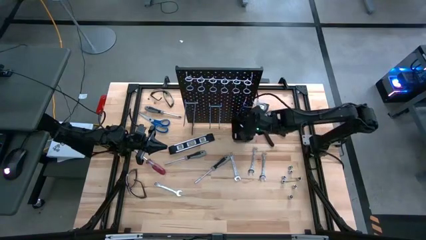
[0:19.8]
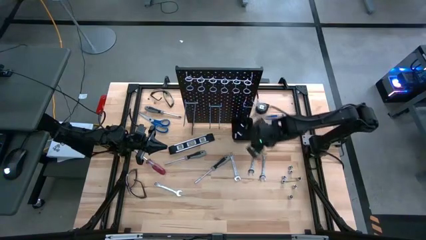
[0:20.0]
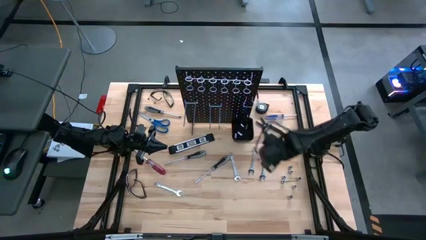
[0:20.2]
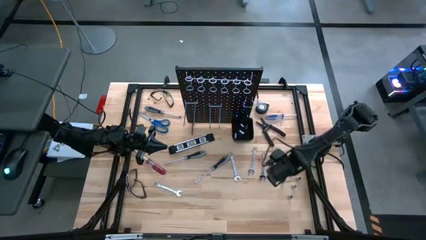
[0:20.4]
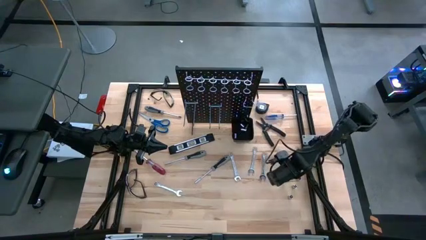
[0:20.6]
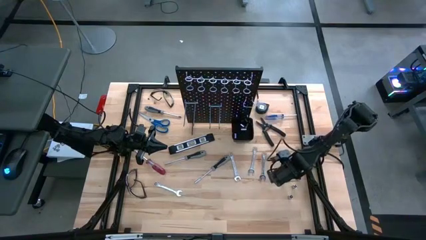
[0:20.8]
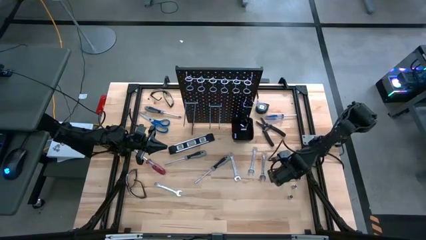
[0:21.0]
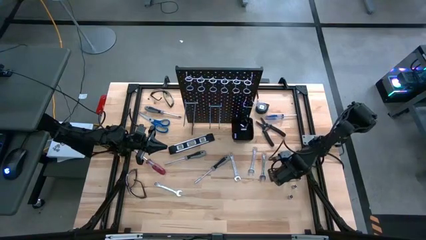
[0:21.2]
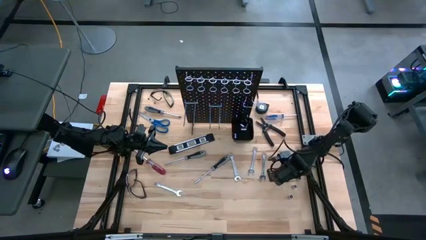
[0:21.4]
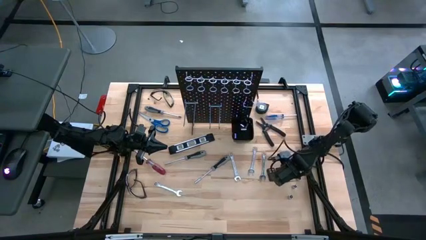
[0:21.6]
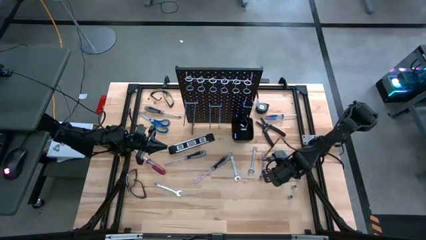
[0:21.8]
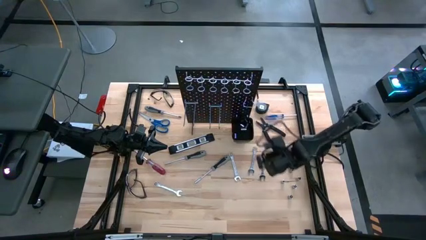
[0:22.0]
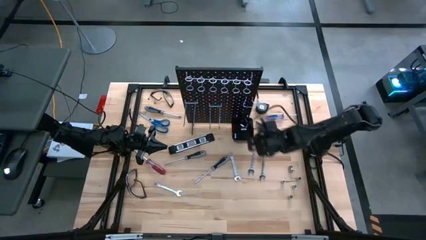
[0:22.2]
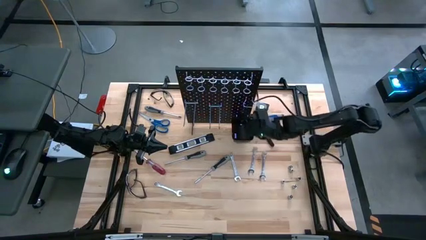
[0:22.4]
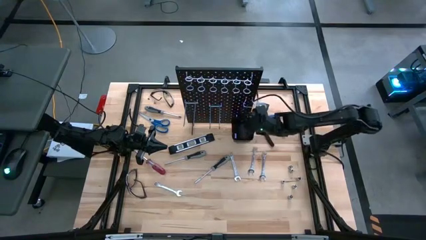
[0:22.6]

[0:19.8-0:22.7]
Task: Hang tools onto peg board
Put the silver socket in the black bin on the pegboard

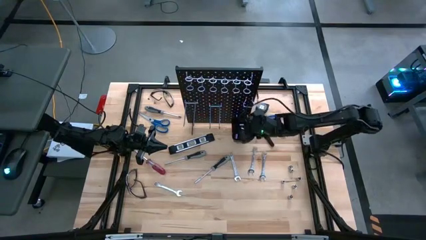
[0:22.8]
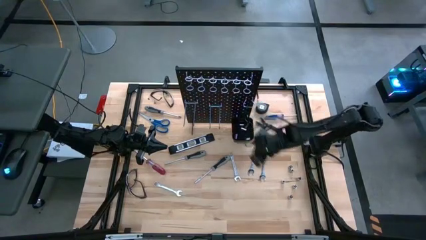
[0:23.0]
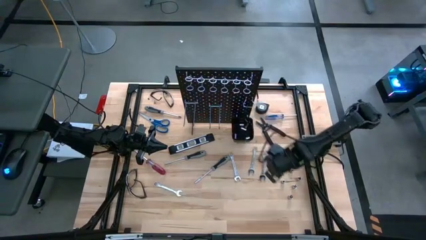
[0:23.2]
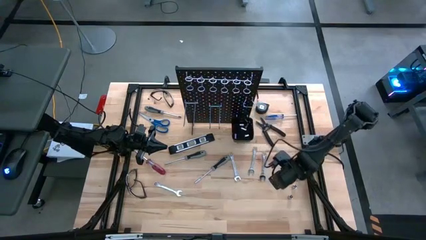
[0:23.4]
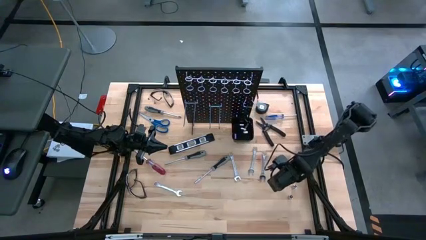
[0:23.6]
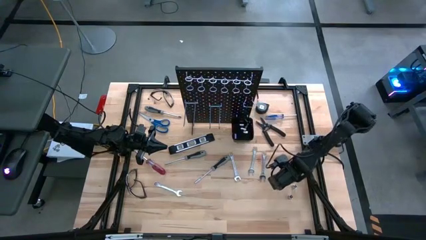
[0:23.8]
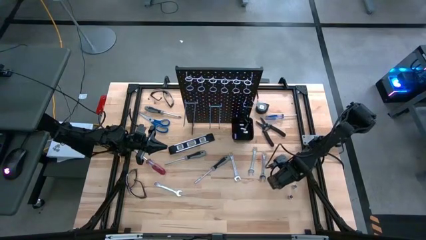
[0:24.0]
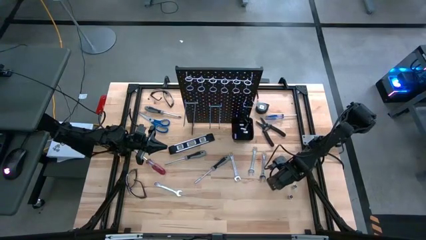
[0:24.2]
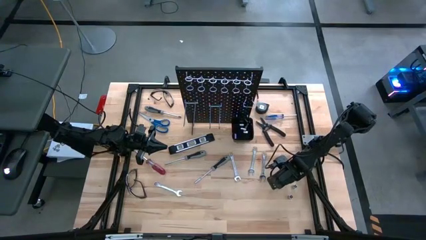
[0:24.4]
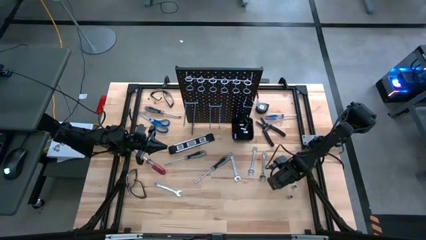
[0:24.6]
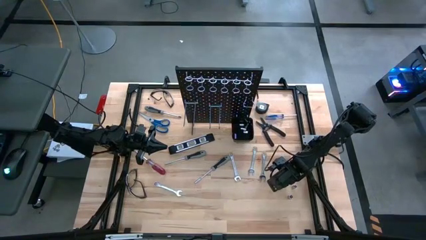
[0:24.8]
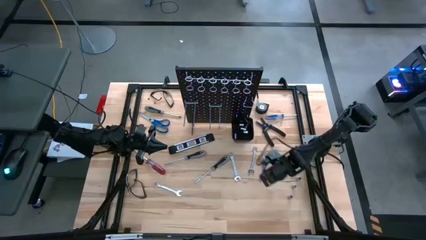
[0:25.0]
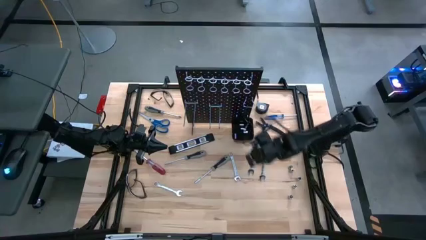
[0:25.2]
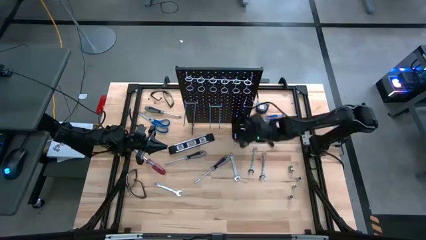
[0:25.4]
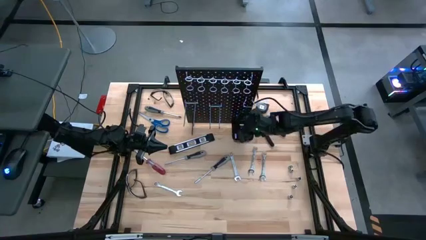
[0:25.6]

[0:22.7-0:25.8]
Put the silver socket in the black bin on the pegboard

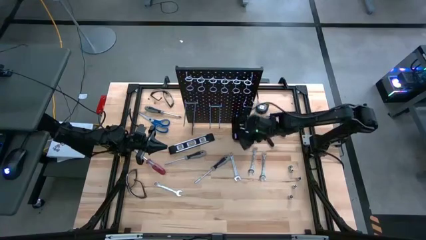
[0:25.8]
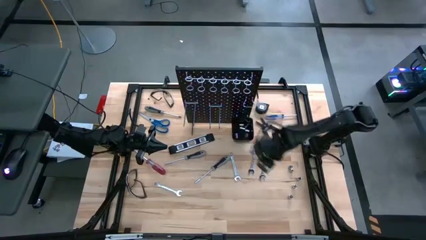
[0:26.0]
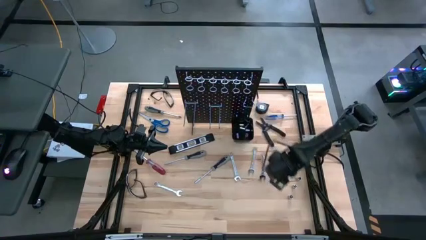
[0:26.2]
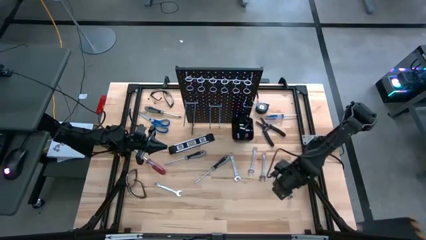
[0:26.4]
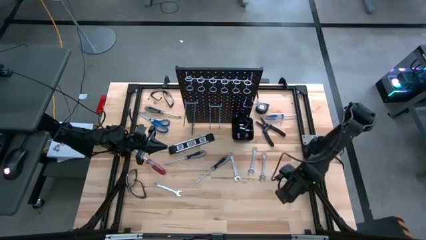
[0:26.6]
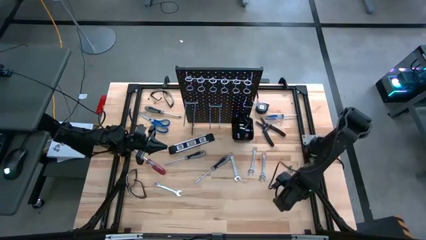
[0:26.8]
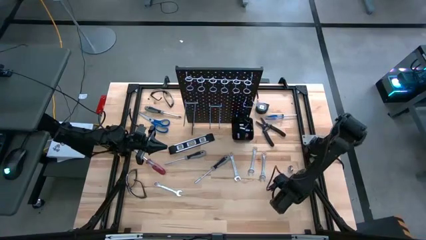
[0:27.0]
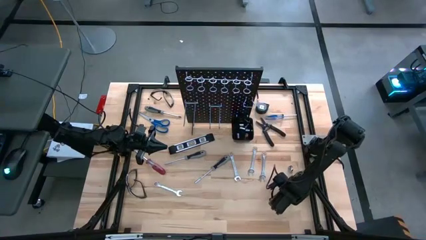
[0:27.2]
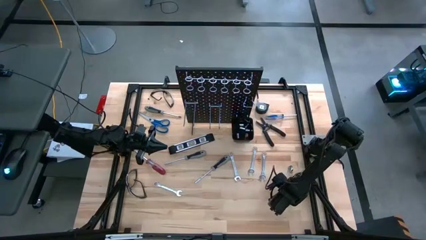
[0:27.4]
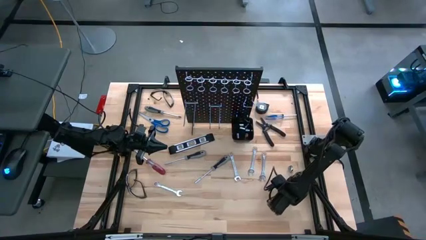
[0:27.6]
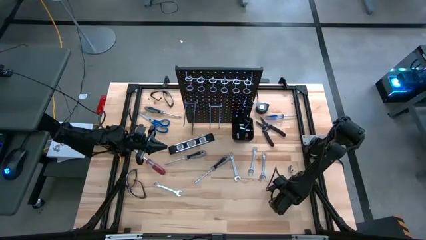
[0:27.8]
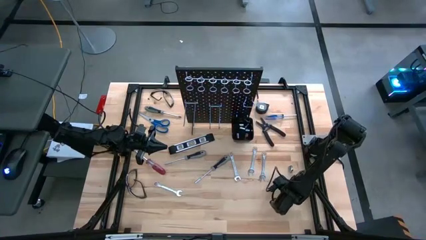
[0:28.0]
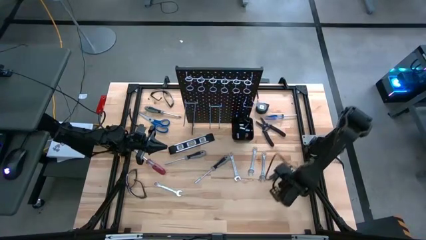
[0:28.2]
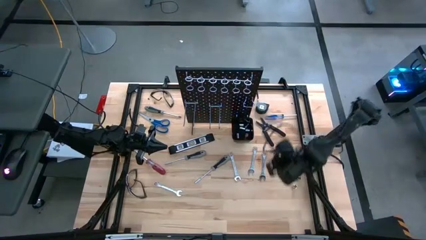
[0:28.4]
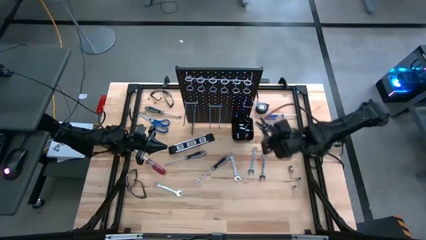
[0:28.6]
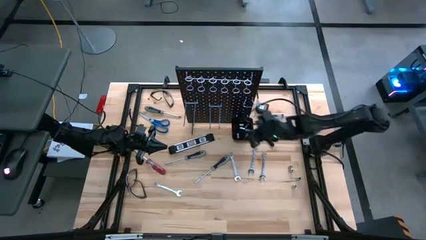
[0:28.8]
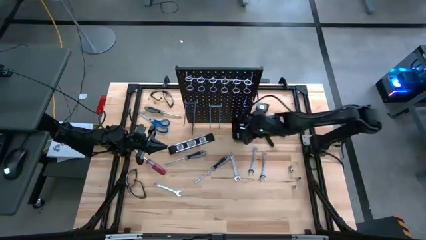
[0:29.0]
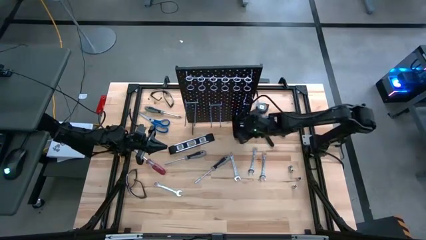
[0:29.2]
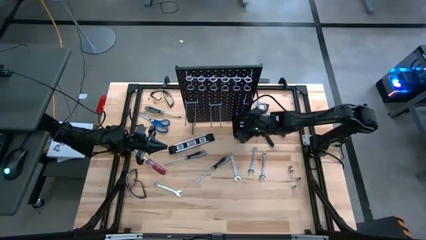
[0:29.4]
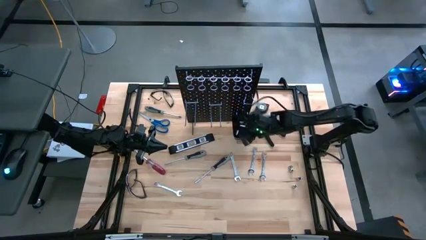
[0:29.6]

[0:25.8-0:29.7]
Put the silver socket in the black bin on the pegboard

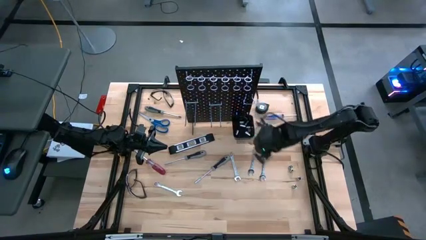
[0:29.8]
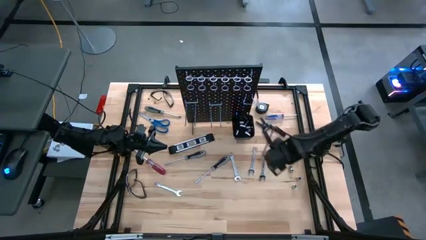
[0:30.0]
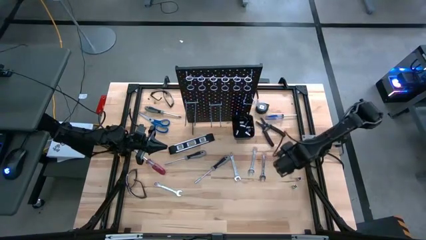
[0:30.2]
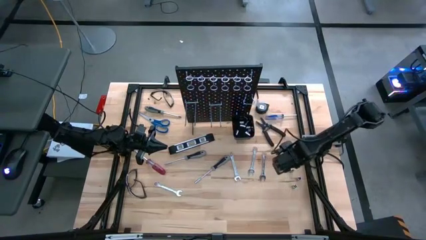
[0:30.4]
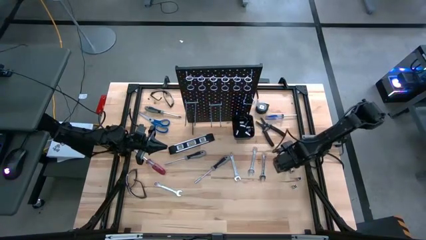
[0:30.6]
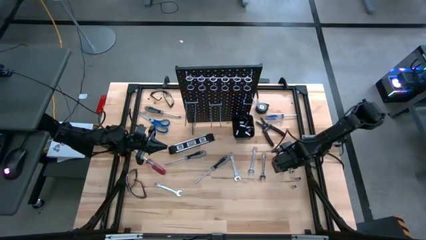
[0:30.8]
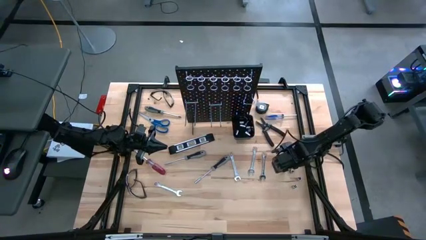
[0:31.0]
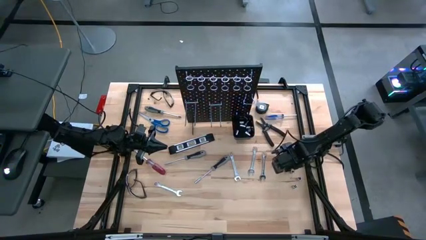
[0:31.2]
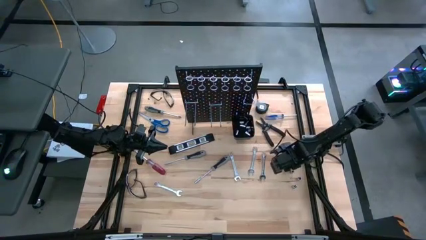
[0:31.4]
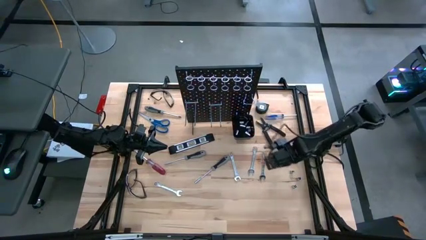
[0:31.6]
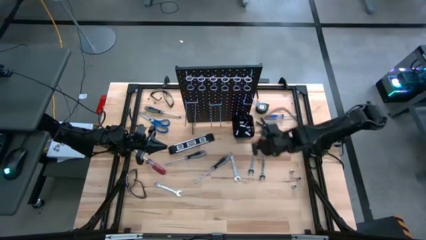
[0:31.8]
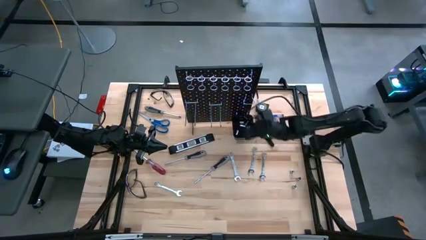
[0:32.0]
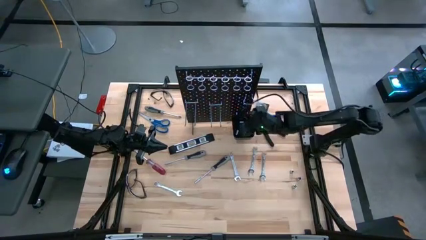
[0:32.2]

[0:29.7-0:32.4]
Put the silver socket in the black bin on the pegboard

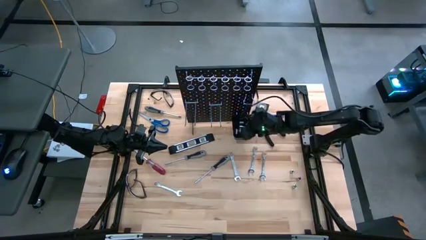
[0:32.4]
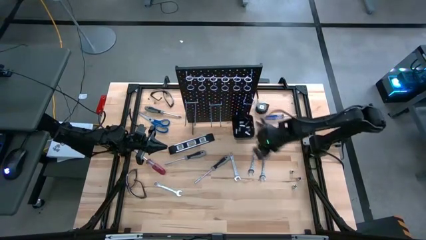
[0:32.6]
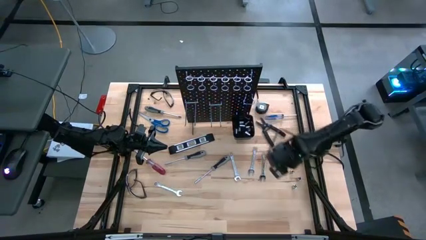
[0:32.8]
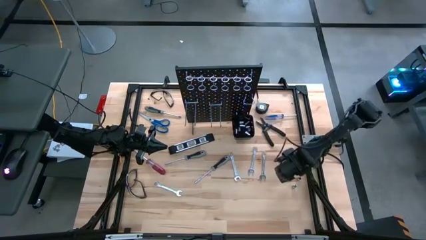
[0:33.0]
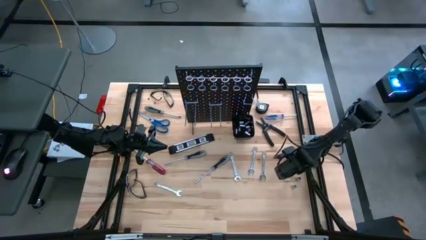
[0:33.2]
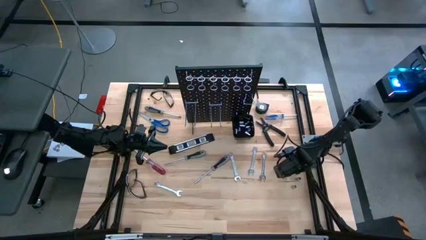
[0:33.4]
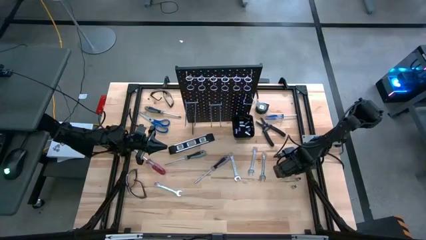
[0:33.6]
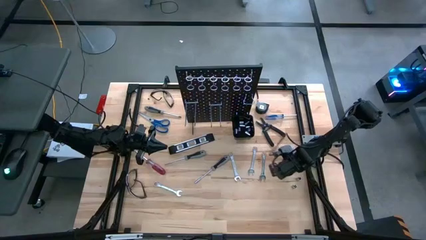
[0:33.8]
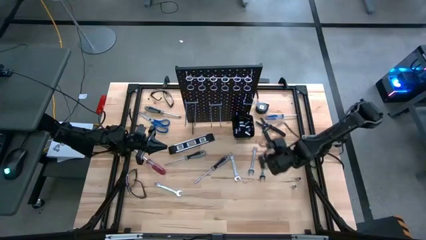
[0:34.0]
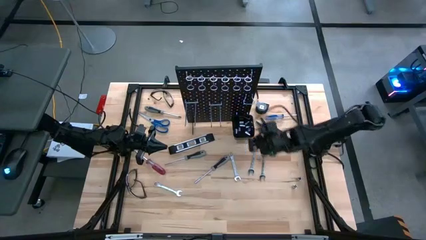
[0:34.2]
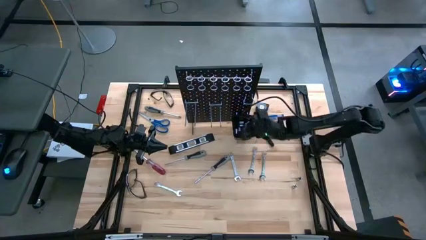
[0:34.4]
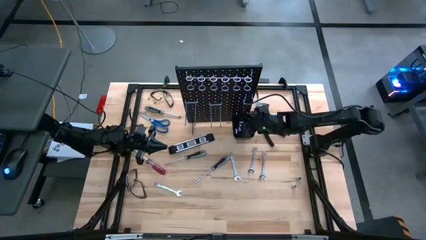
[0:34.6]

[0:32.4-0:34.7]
Put the silver socket in the black bin on the pegboard

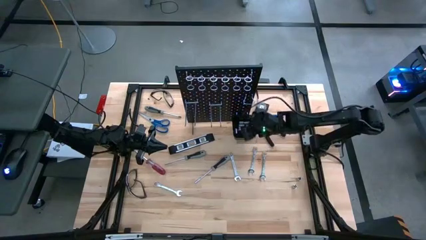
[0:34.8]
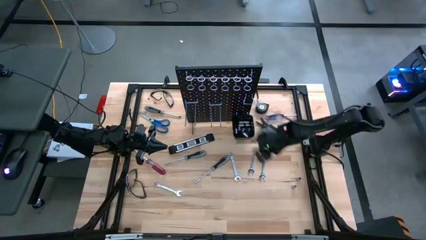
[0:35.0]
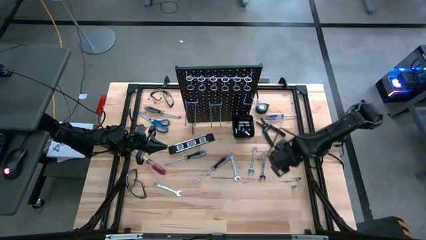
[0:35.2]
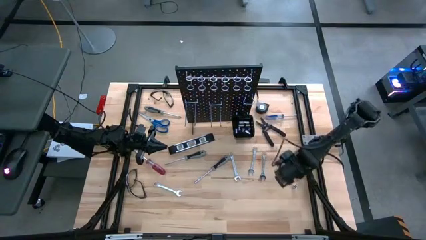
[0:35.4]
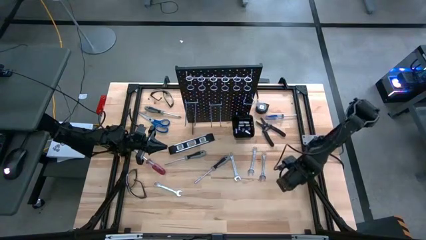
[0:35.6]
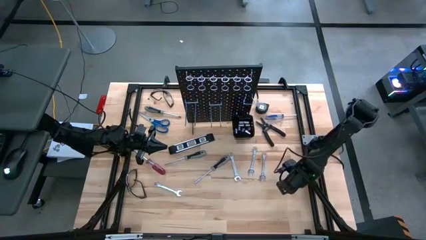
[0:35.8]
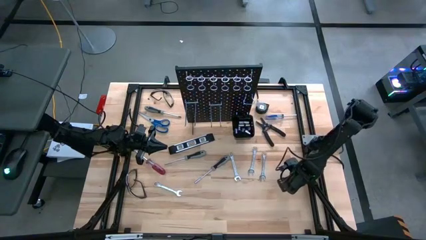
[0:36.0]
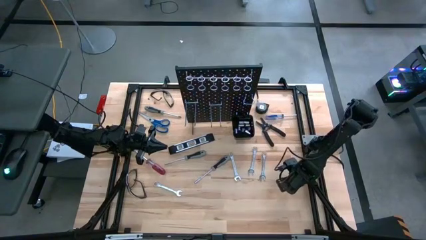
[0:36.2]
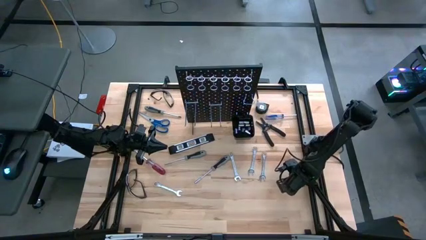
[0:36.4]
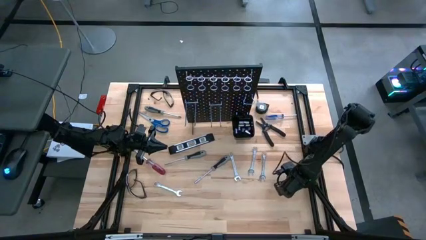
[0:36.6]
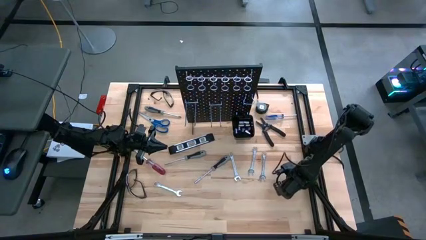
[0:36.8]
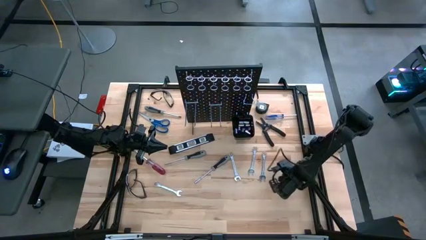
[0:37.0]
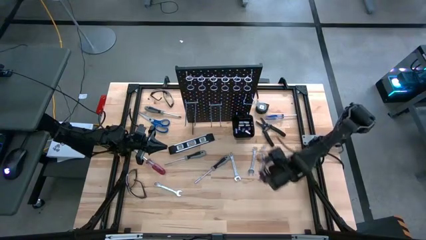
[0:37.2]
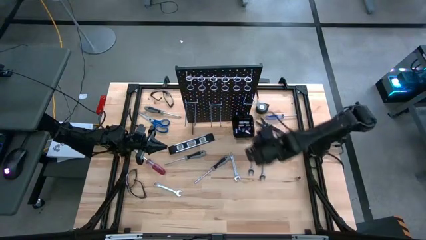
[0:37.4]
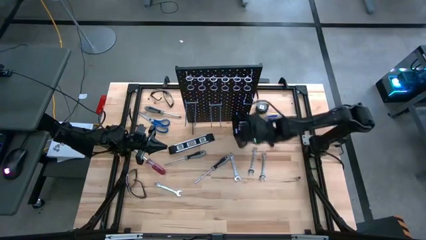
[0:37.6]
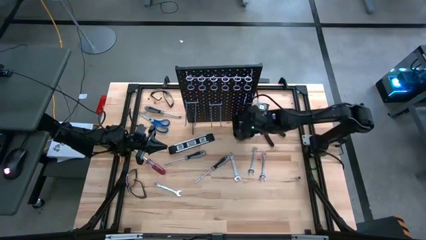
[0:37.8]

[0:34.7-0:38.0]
Put the silver socket in the black bin on the pegboard
